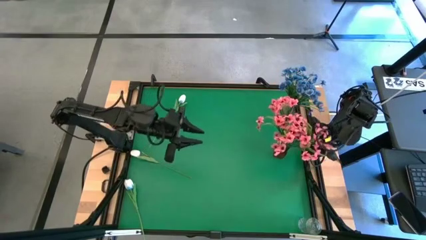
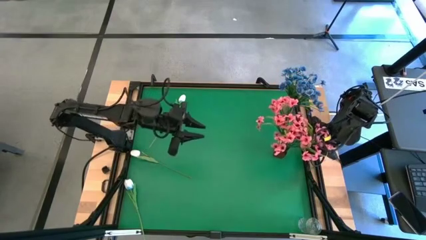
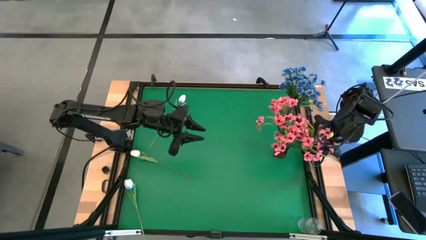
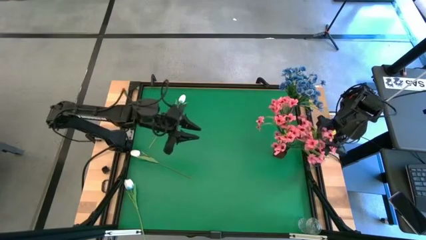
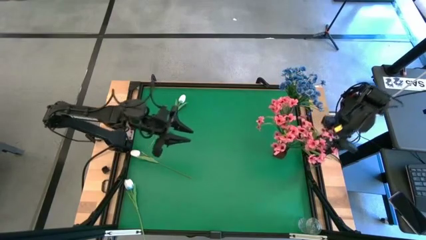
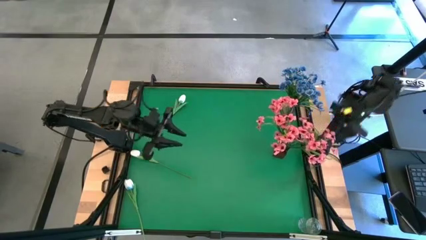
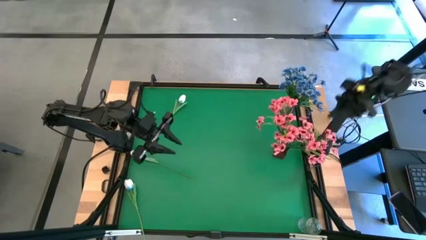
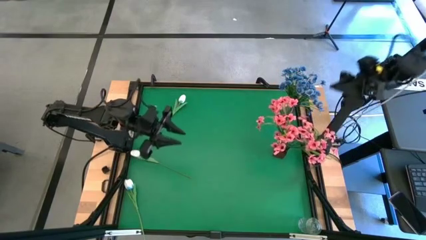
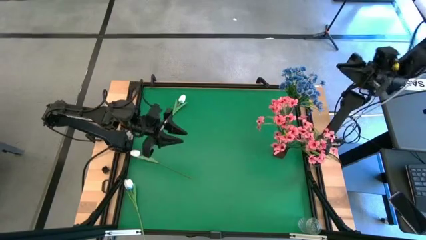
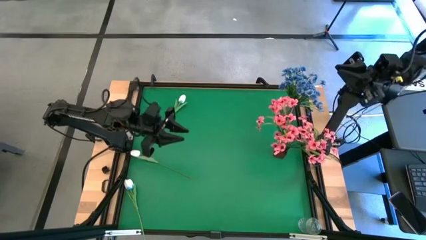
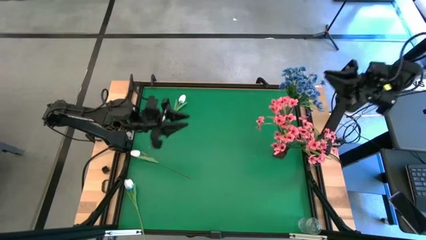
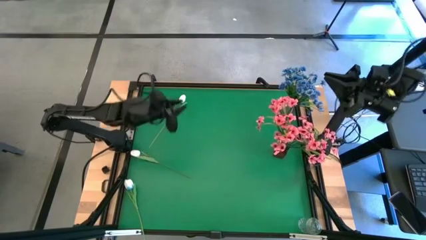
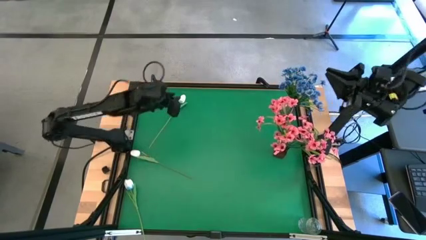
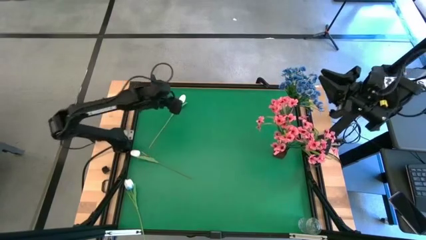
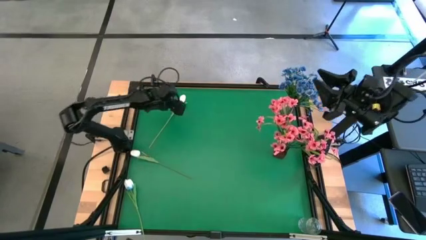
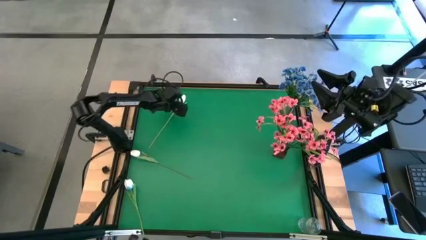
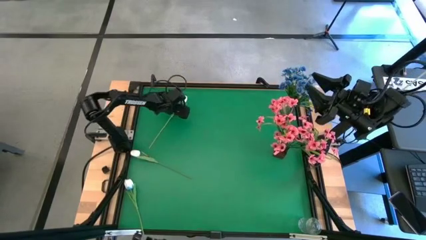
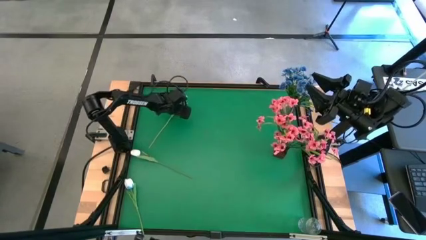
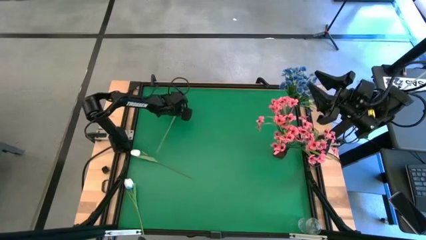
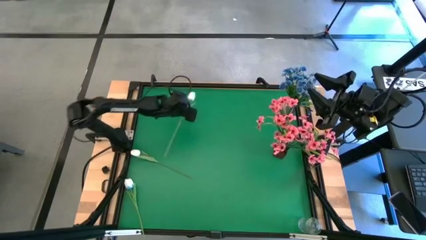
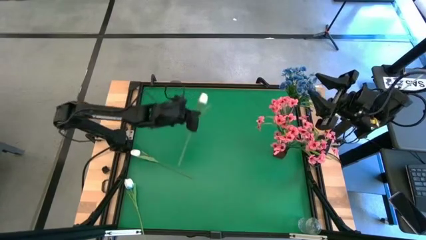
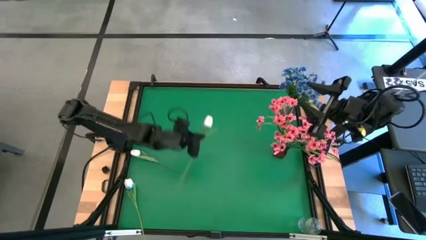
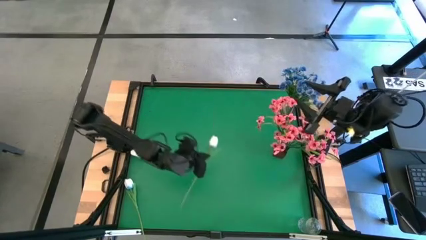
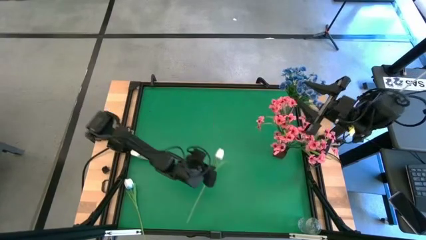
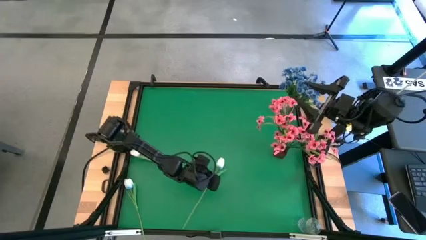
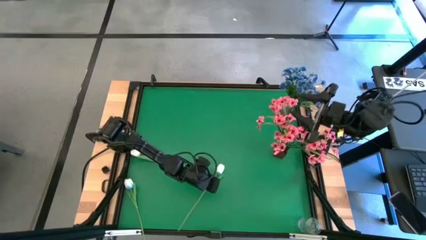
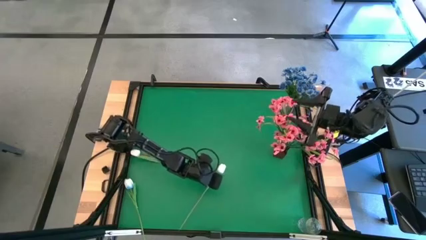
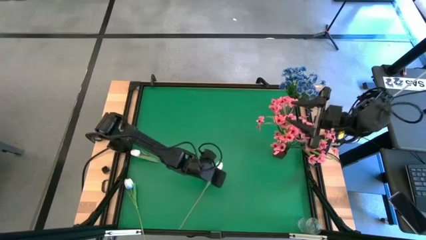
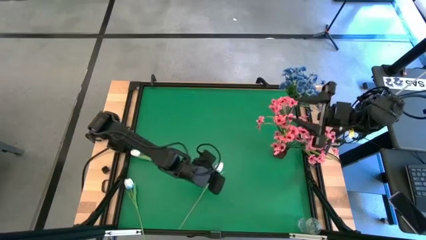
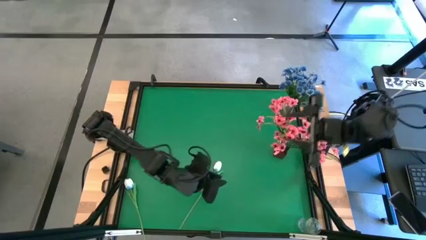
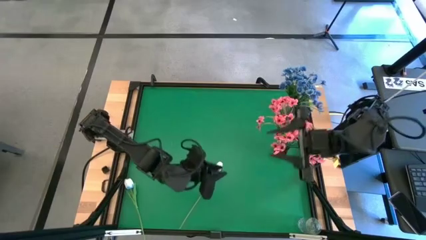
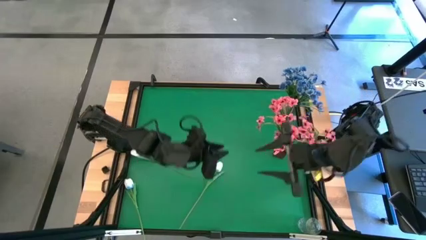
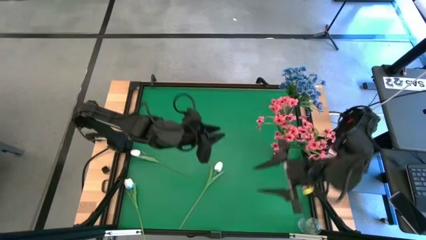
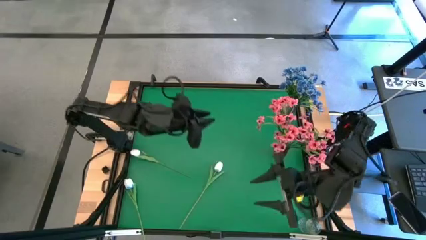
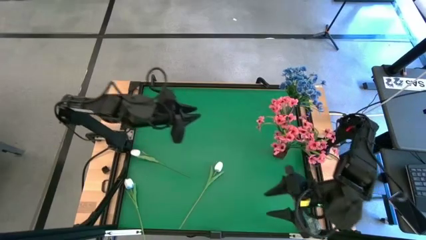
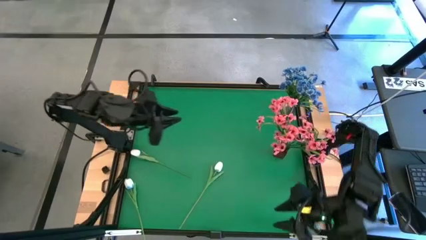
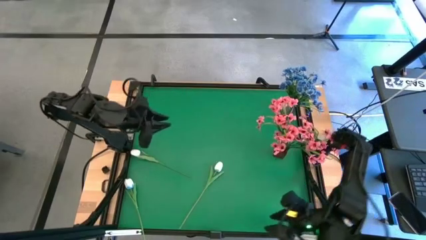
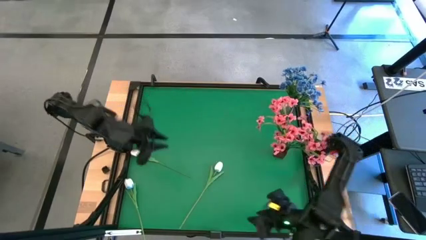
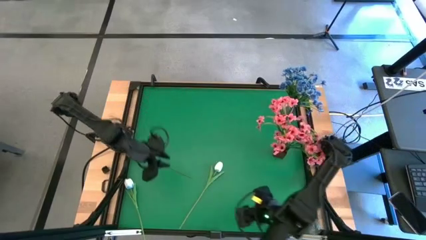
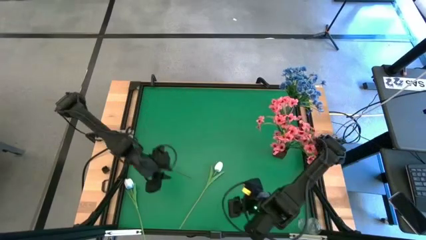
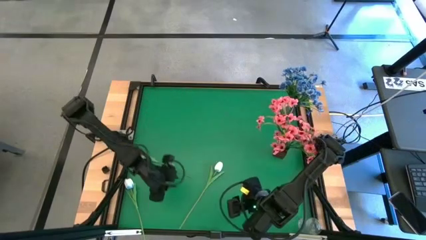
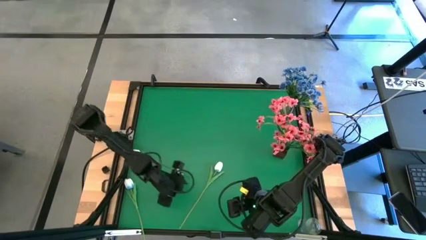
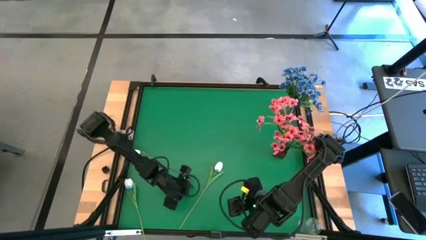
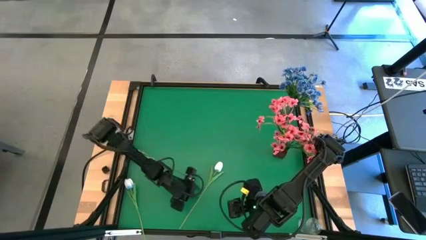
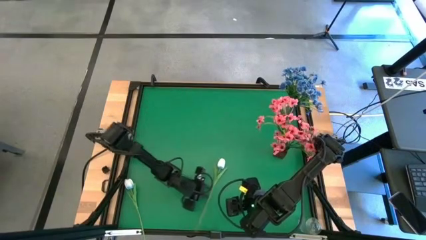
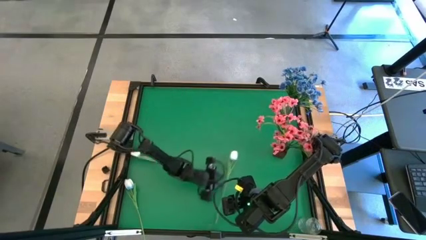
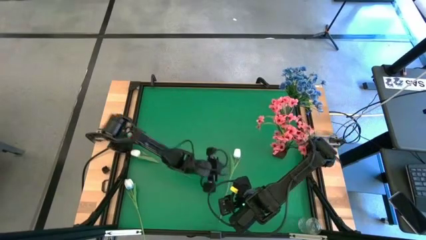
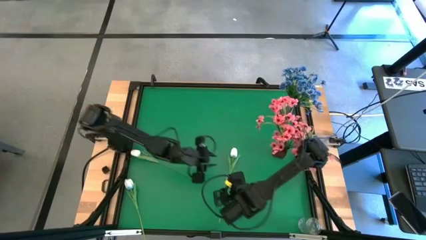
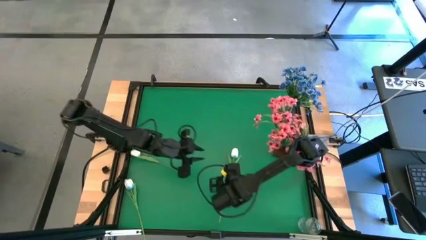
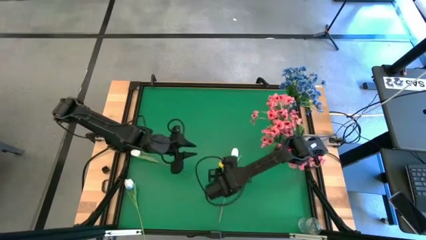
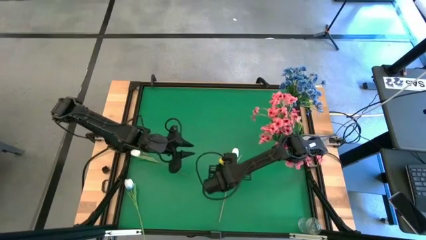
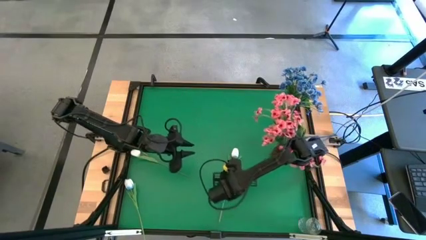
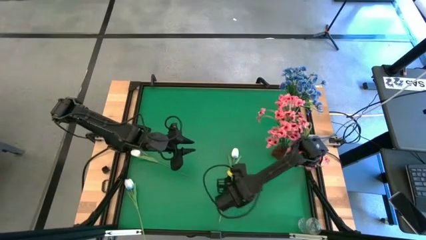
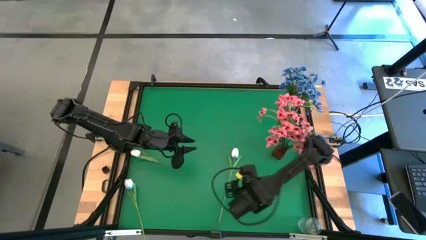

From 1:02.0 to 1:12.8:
Task: Sort flowers into vase by color
Put the top white flower into the transparent vase
